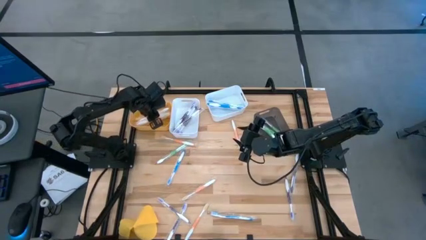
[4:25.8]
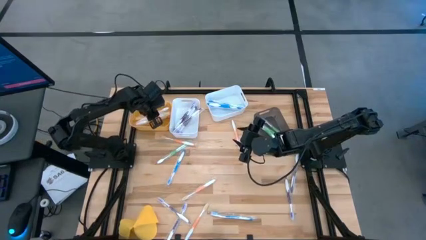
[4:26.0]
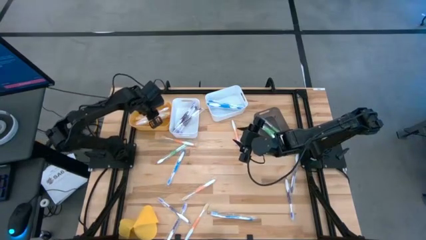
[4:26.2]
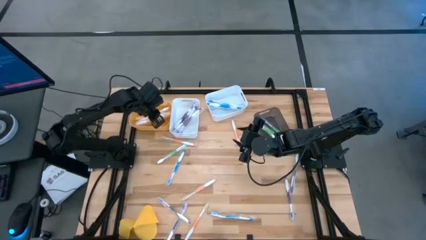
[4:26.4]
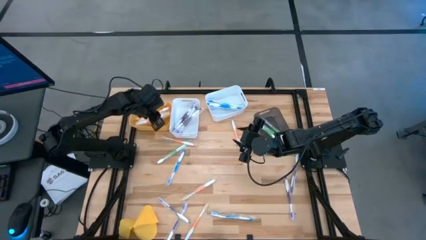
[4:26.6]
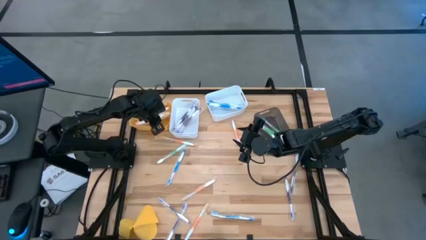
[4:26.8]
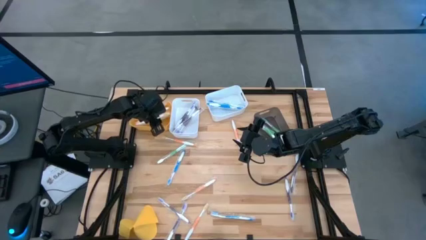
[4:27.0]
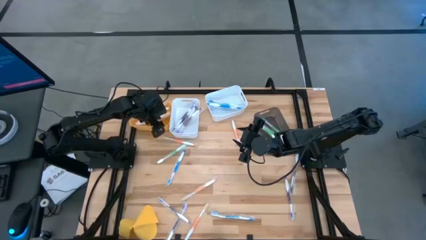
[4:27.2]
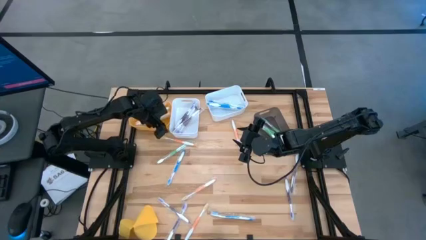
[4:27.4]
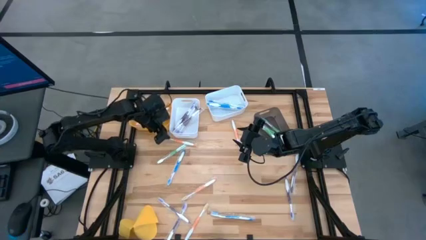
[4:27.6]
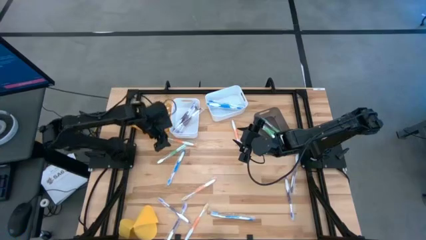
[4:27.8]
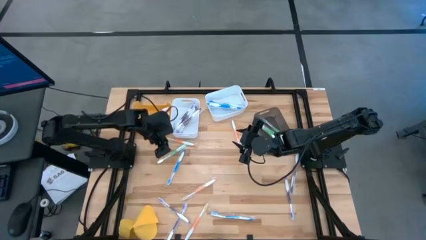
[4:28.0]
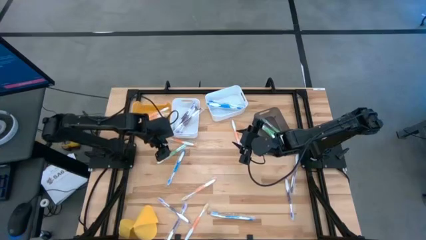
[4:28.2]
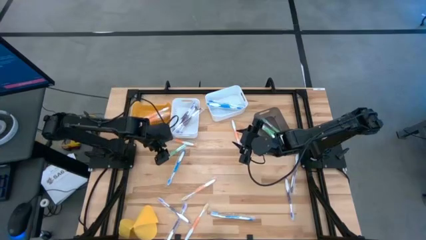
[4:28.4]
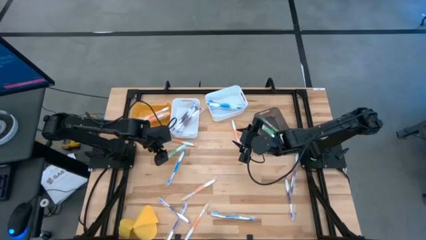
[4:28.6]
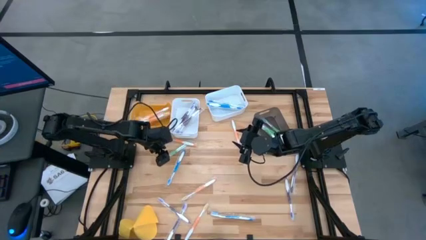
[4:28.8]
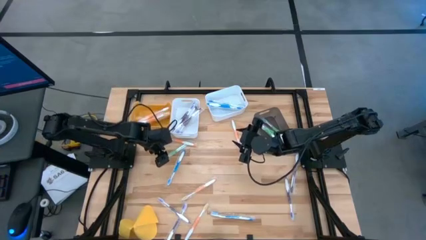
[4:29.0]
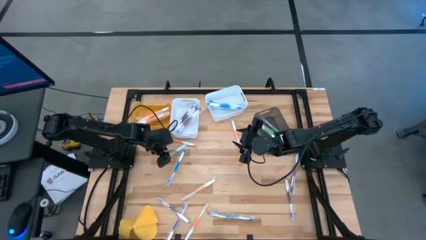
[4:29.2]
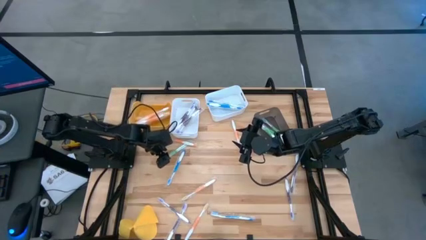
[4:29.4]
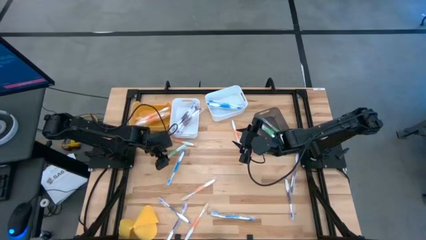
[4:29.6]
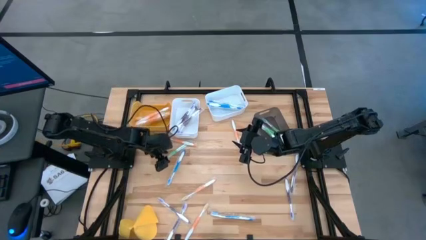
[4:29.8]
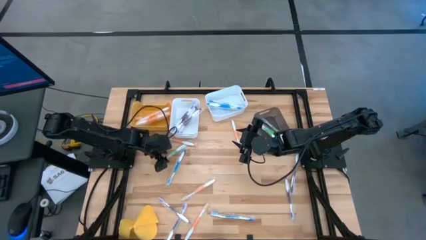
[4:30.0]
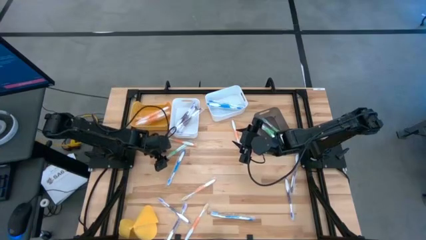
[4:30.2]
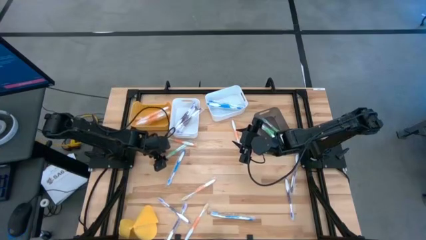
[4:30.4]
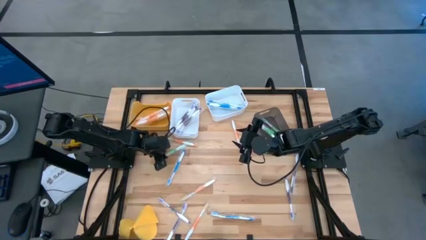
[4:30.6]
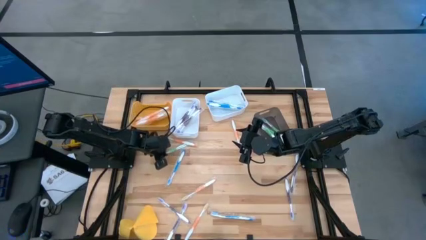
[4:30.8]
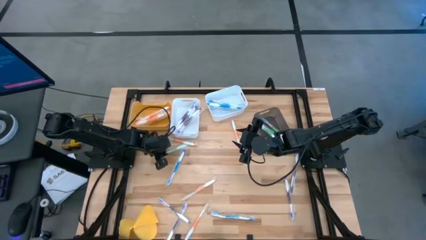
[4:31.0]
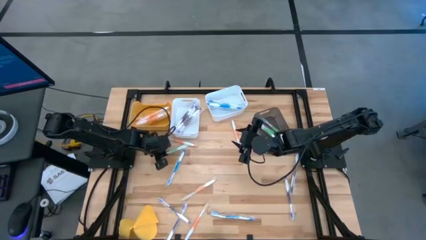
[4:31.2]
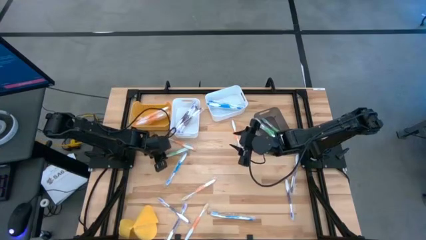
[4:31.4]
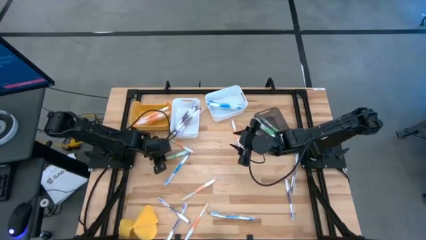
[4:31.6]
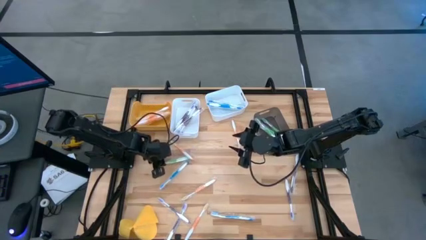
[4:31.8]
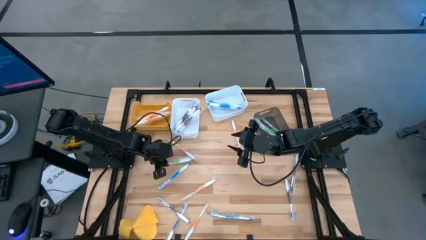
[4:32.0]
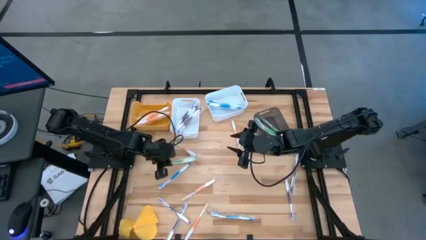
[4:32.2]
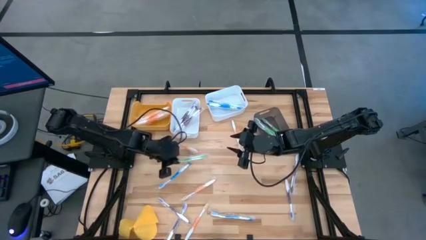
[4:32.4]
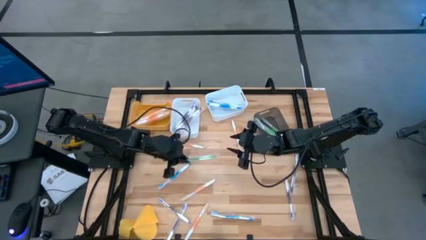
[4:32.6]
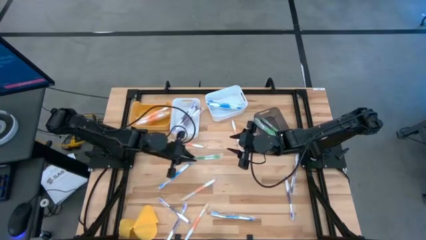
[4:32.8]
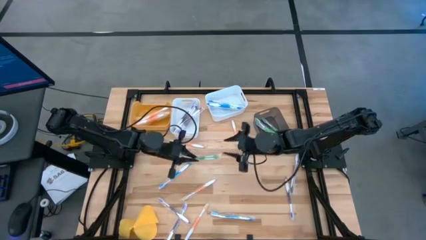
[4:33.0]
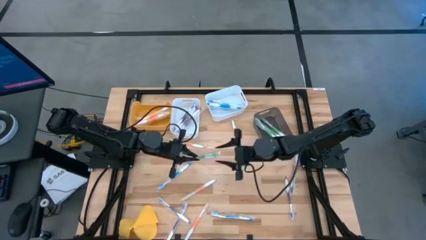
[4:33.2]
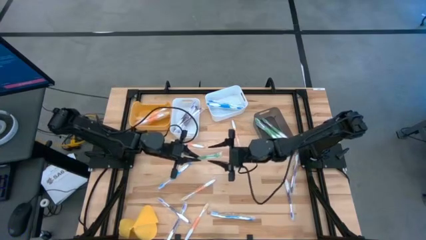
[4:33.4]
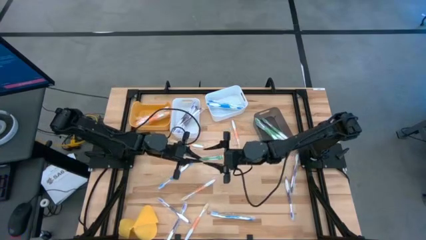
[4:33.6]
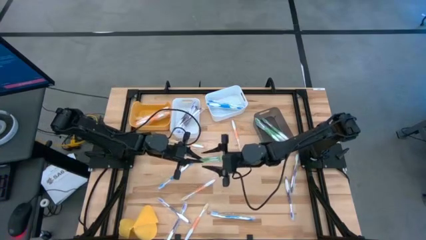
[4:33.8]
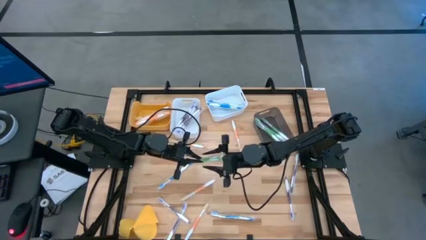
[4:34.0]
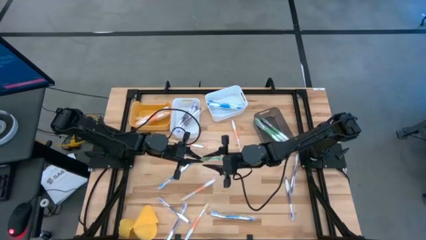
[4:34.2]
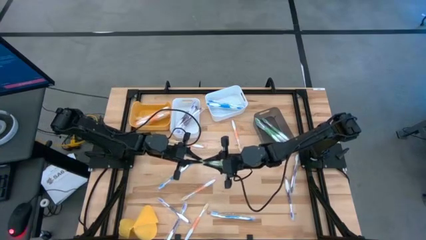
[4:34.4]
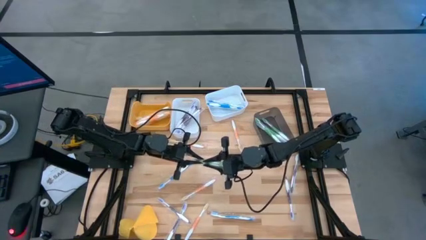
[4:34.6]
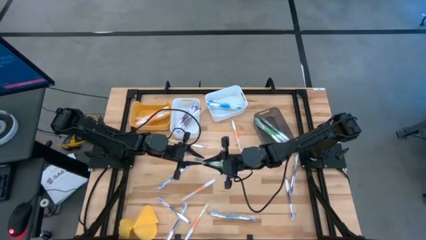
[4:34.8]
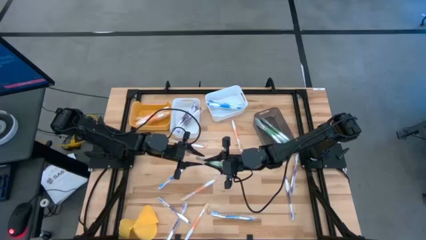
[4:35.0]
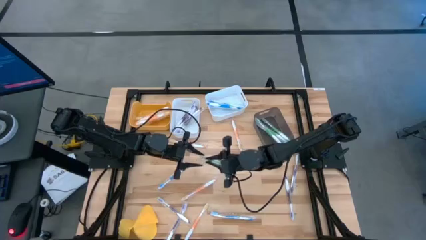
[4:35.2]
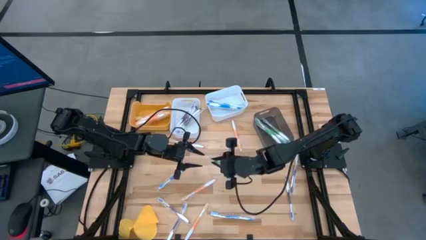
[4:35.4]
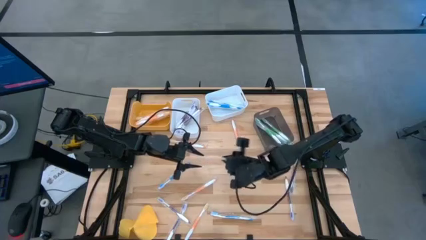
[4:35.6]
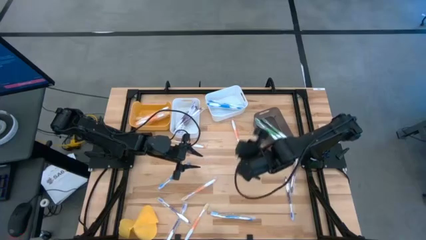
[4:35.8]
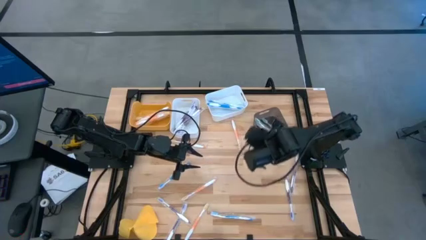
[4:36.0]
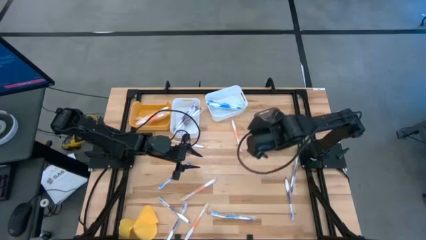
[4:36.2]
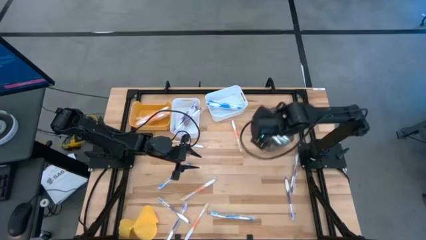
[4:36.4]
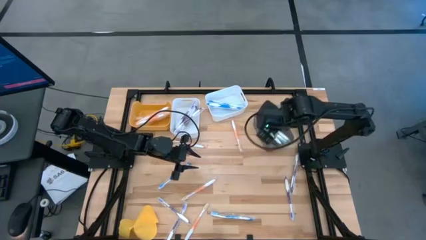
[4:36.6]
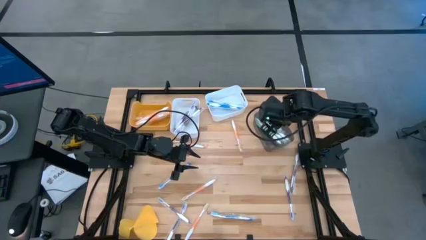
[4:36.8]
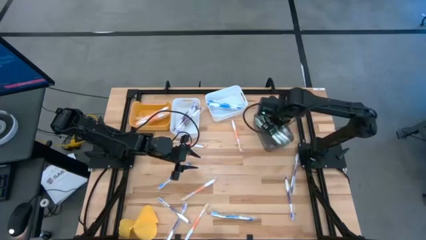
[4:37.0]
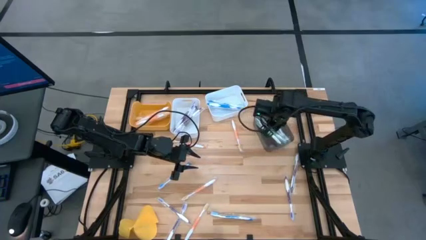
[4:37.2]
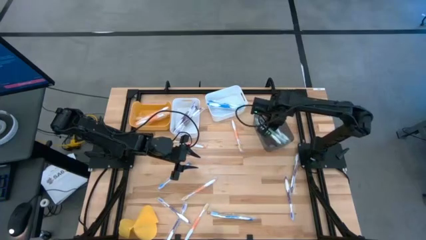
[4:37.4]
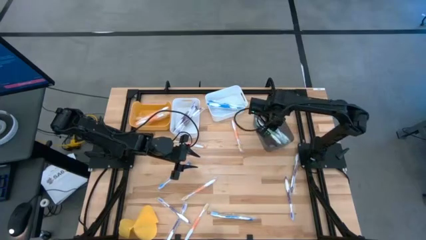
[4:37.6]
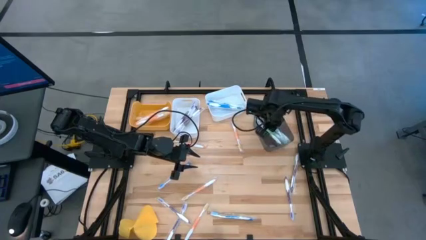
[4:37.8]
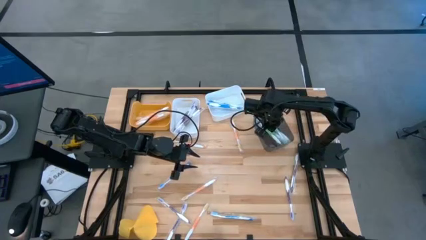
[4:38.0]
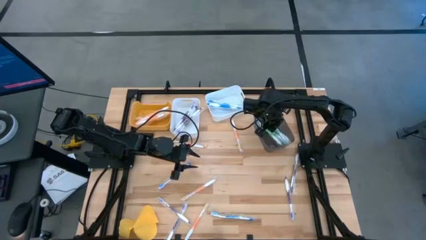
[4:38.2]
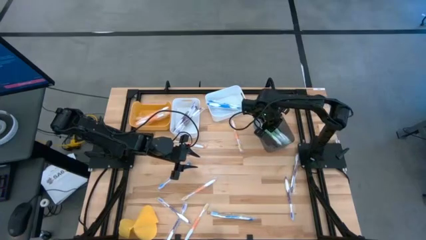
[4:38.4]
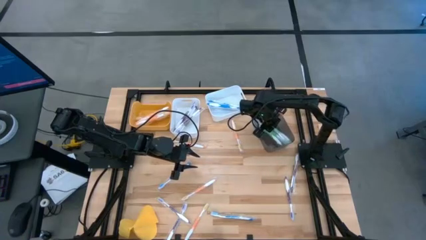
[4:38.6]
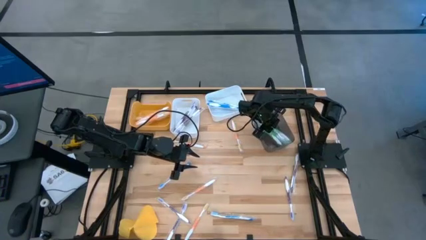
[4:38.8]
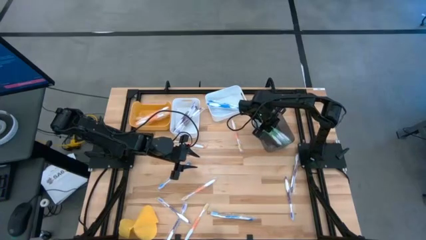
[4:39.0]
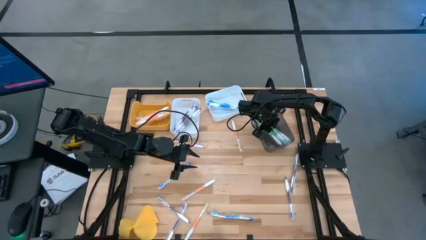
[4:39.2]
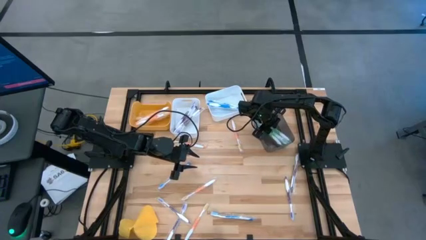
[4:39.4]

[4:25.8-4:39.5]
Task: Pick & Place Toothbrushes
Put the green toothbrush into the black bin
